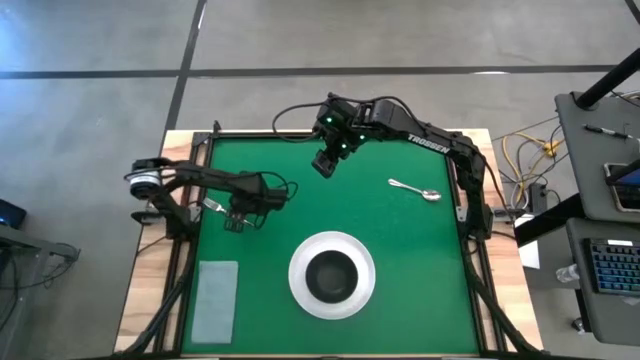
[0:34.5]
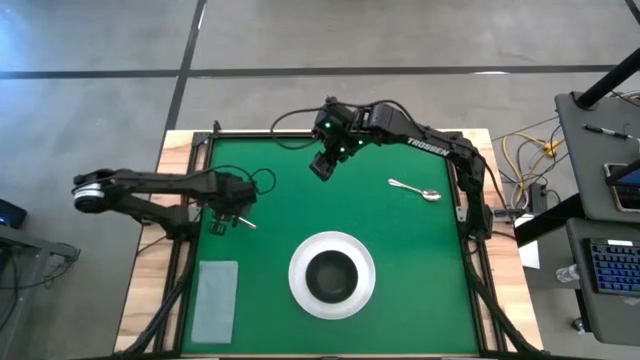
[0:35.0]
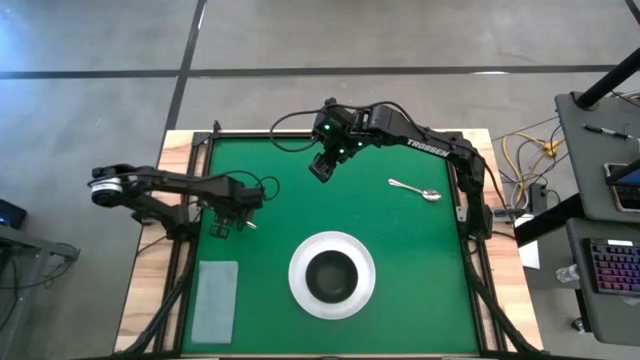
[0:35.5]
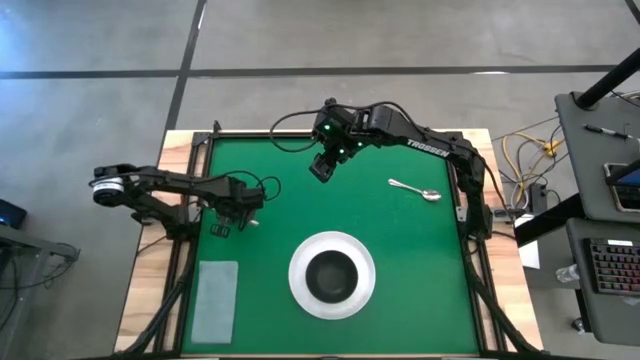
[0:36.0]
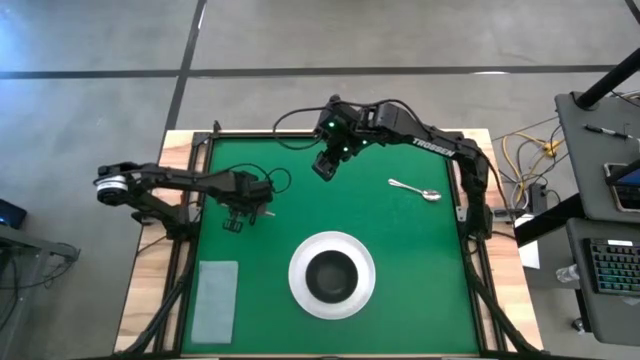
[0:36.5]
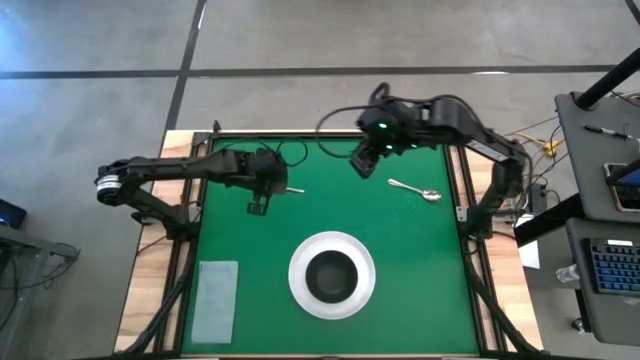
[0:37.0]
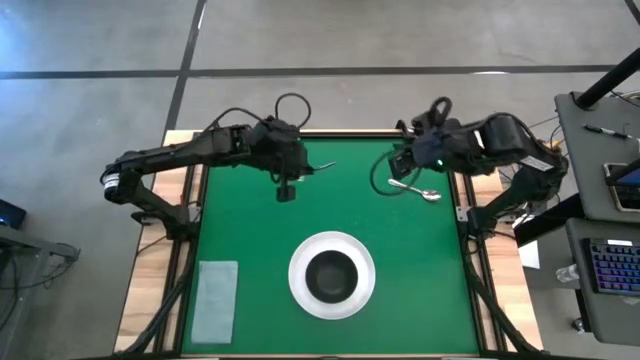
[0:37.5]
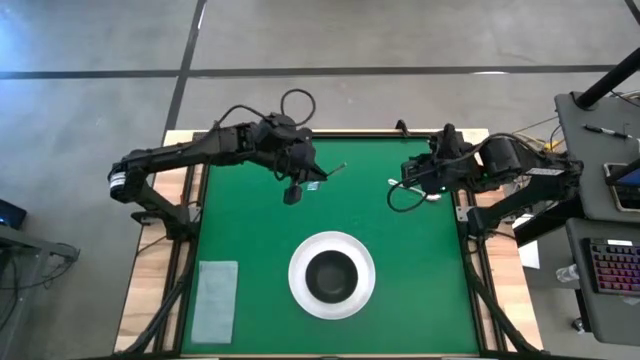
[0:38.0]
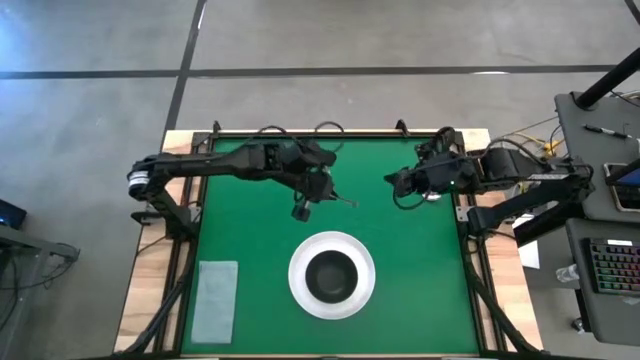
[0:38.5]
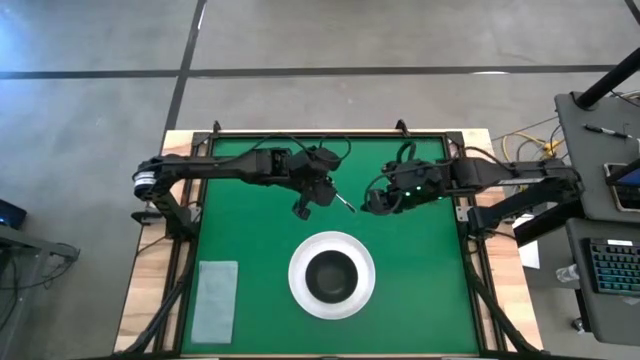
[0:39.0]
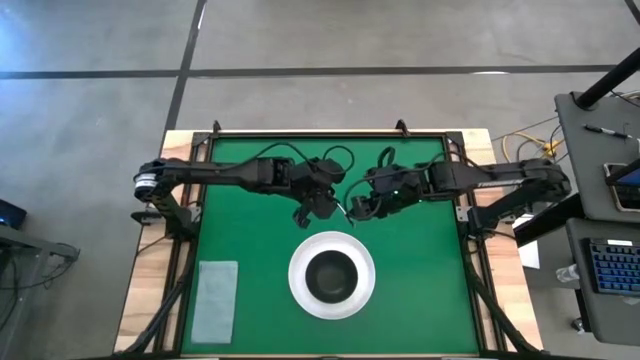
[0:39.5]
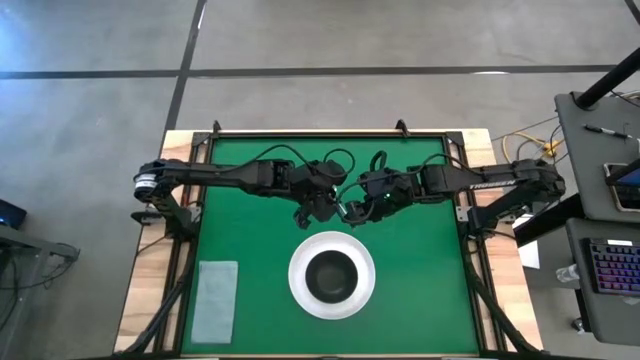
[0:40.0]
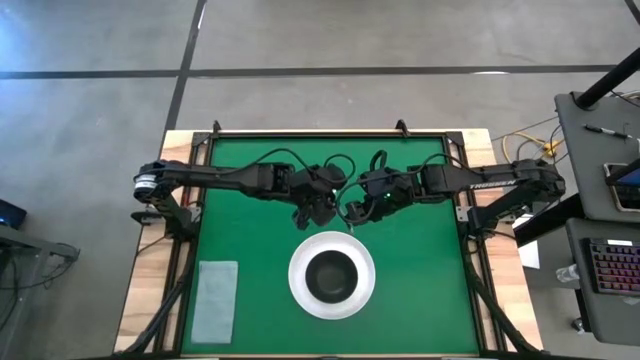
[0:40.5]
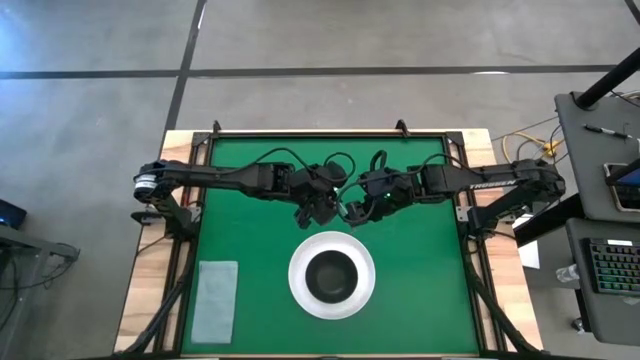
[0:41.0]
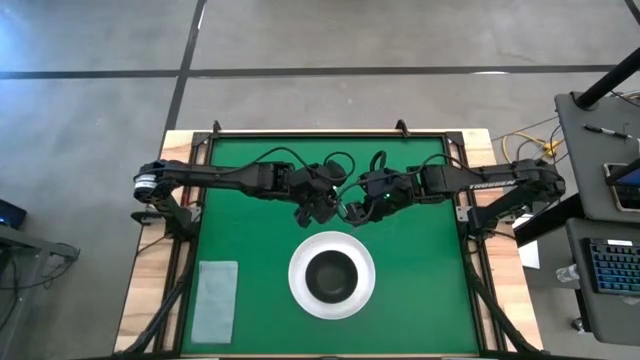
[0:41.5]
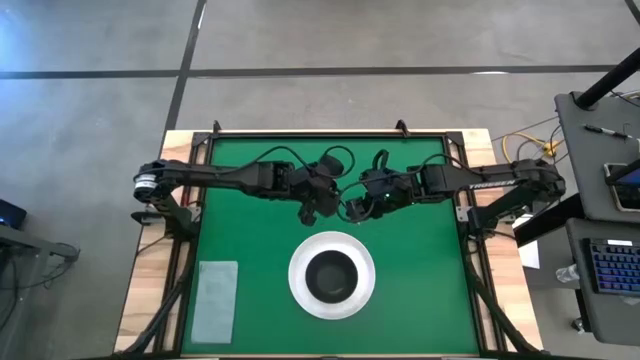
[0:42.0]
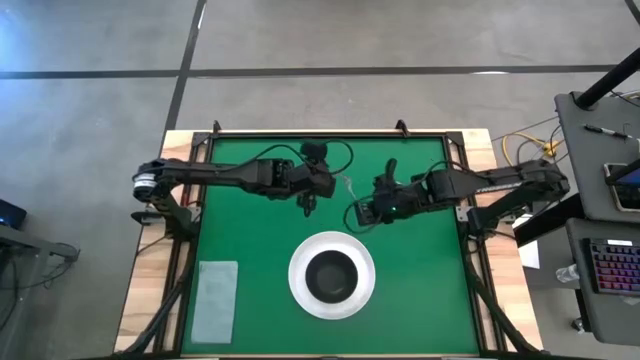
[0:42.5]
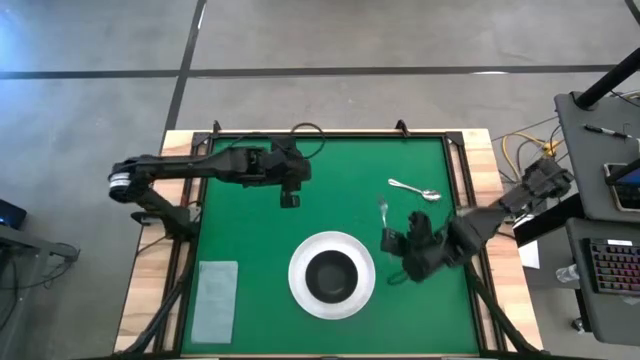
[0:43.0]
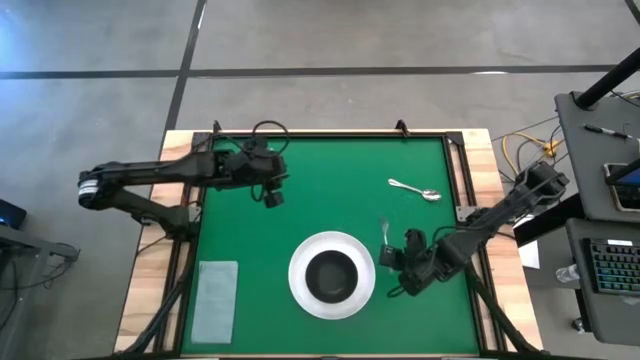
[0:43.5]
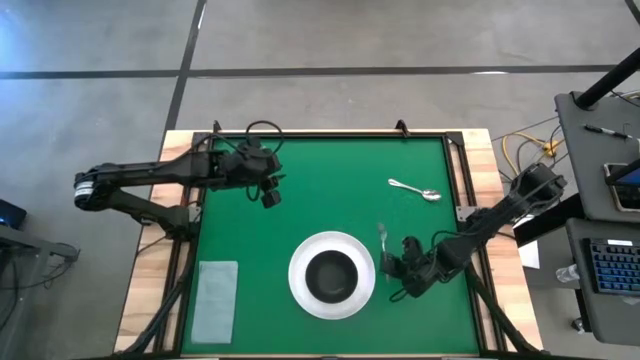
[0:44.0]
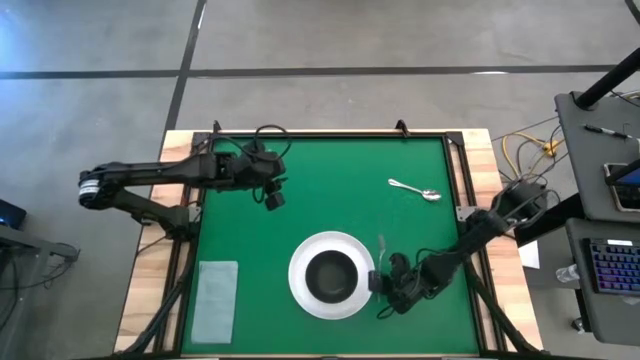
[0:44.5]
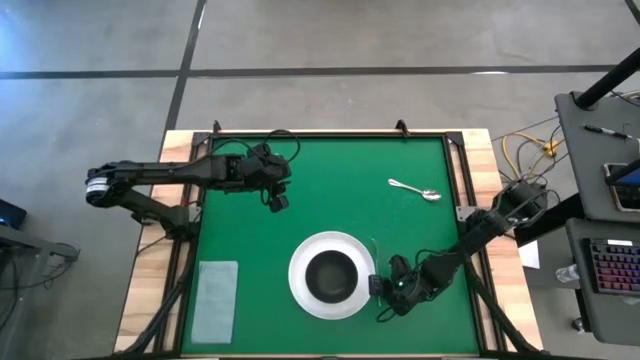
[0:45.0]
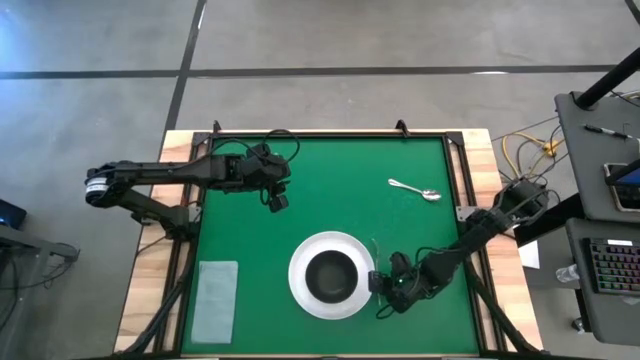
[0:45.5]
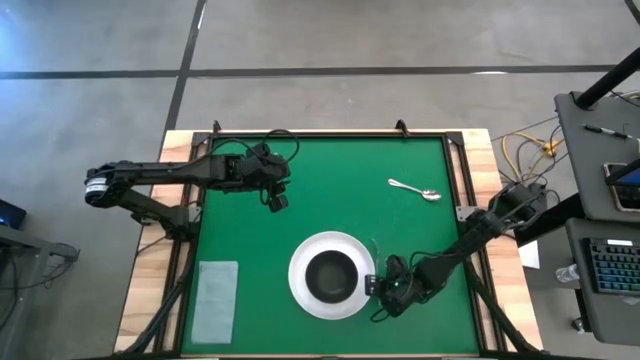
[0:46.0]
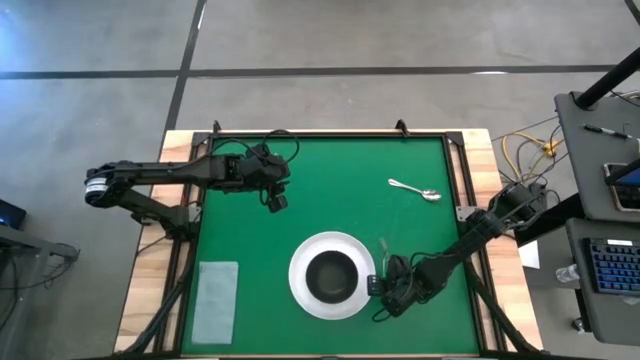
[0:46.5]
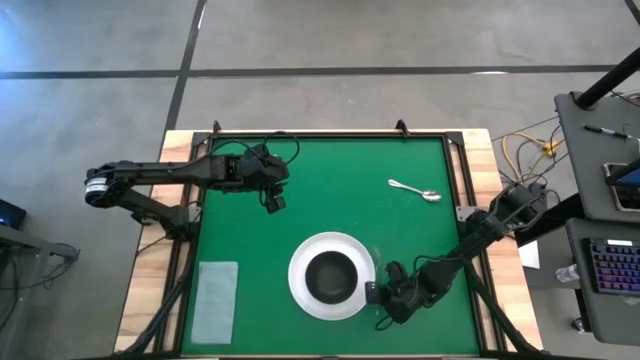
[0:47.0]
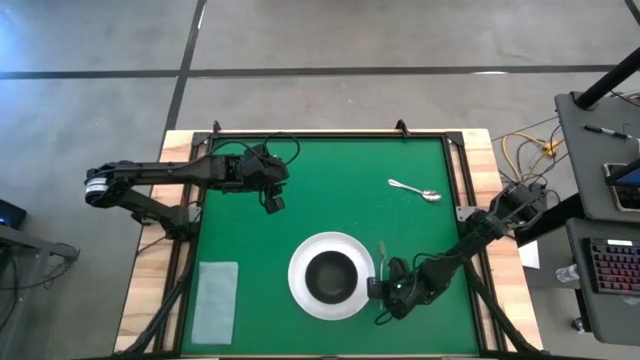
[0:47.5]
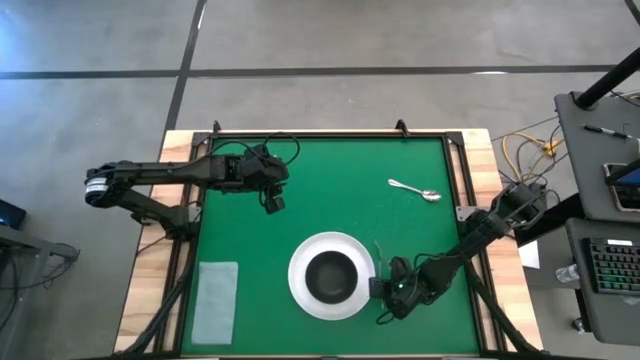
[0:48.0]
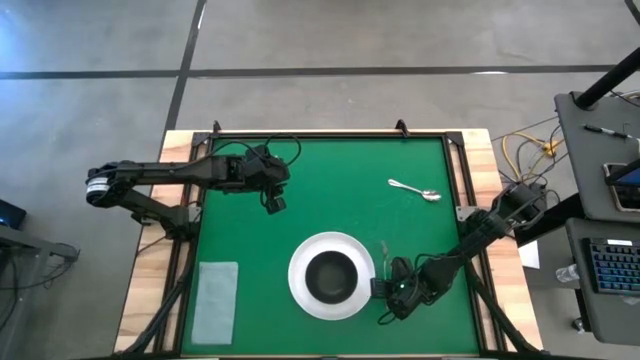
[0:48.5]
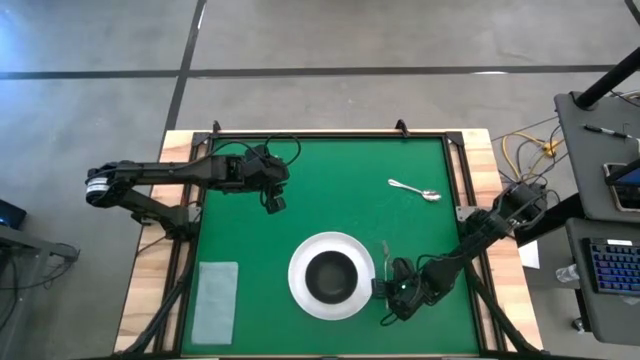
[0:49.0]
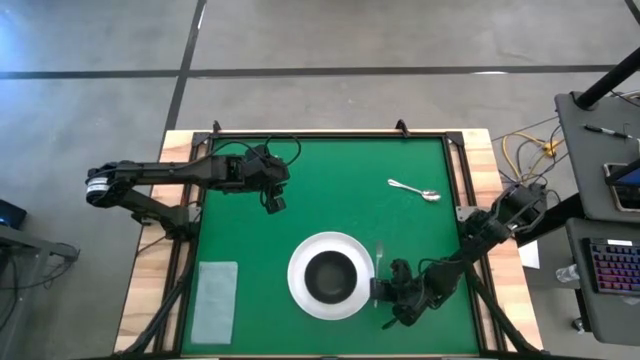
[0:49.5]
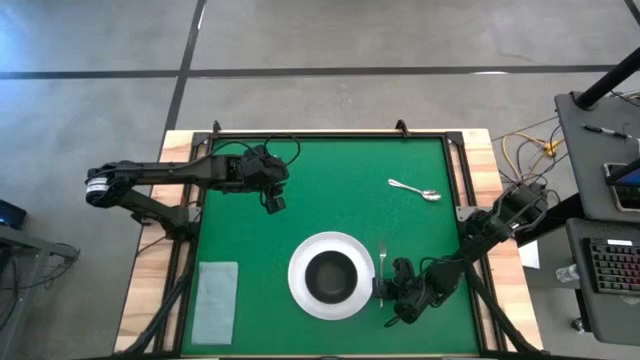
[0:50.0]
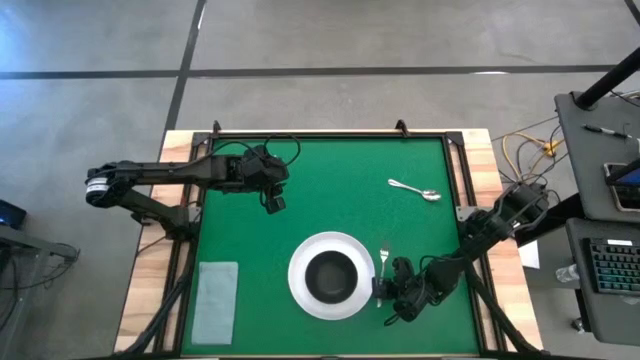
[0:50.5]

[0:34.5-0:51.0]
Task: Set table place
Put the fork beside the white plate on the table

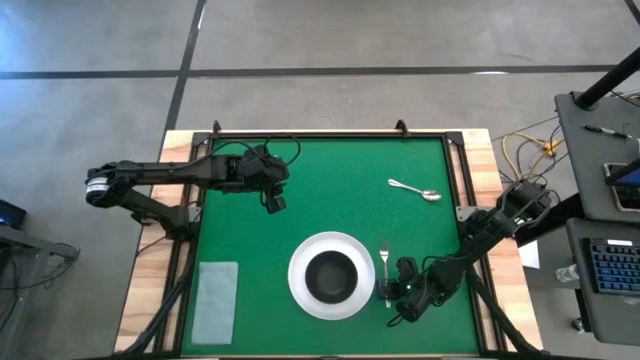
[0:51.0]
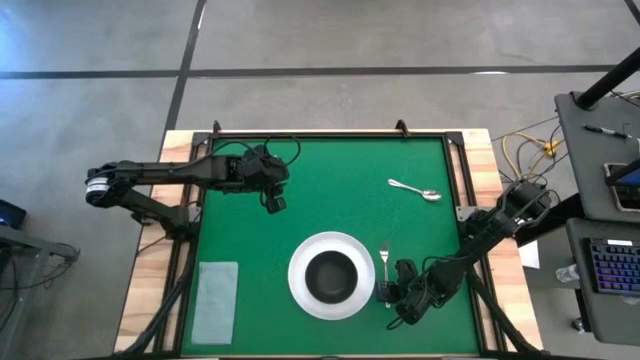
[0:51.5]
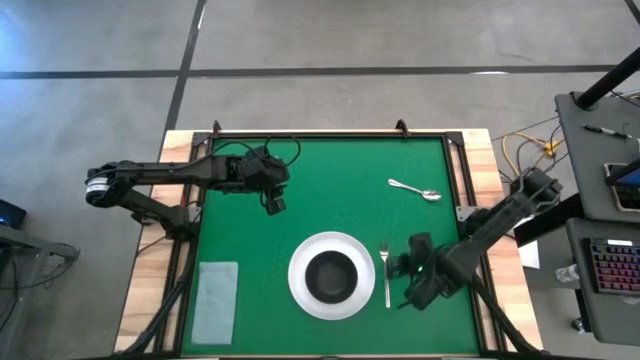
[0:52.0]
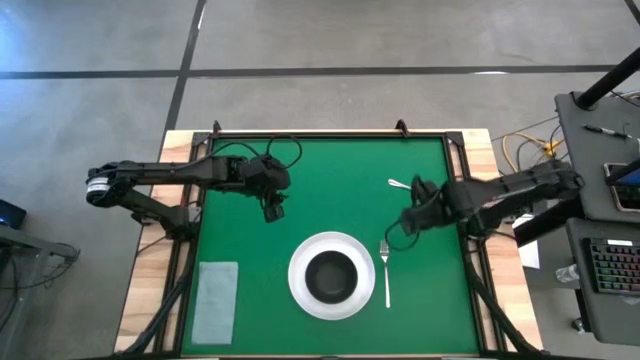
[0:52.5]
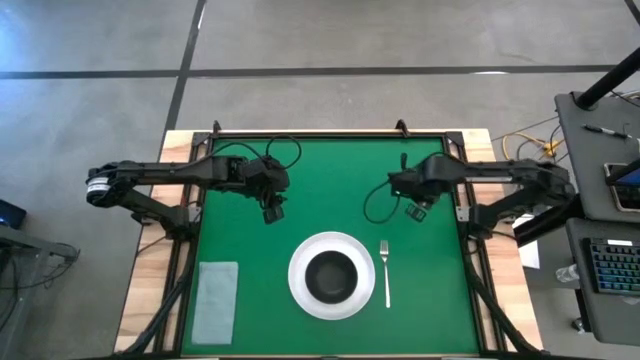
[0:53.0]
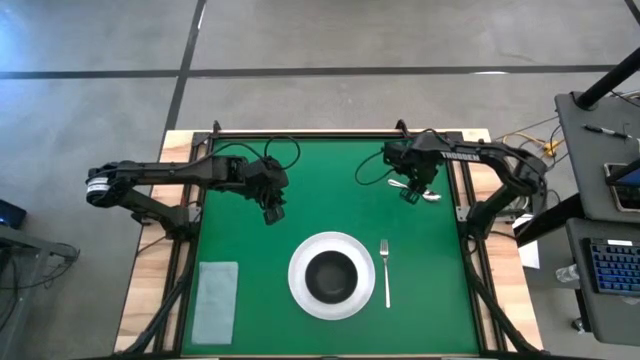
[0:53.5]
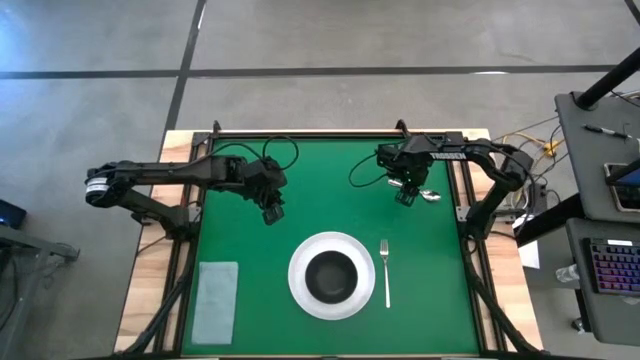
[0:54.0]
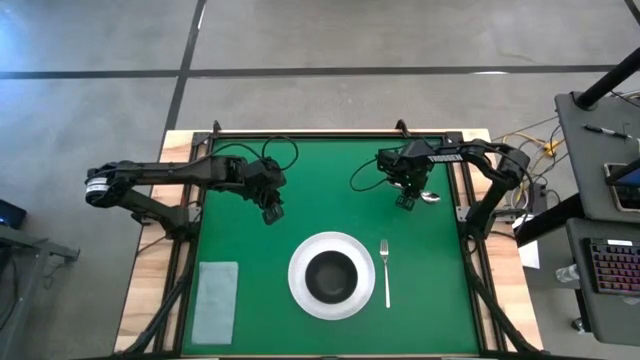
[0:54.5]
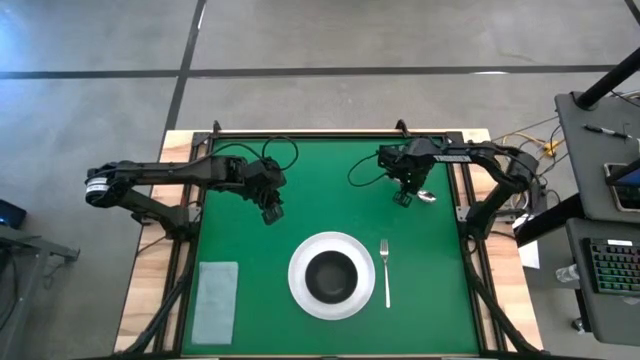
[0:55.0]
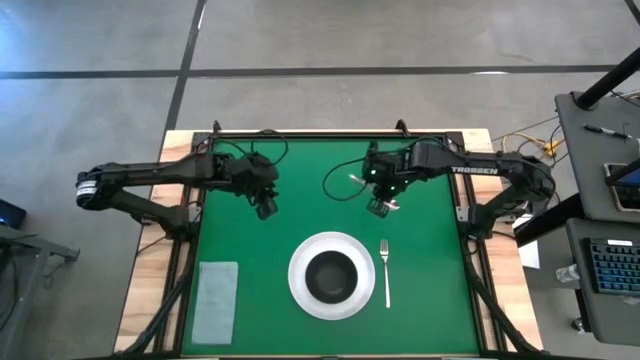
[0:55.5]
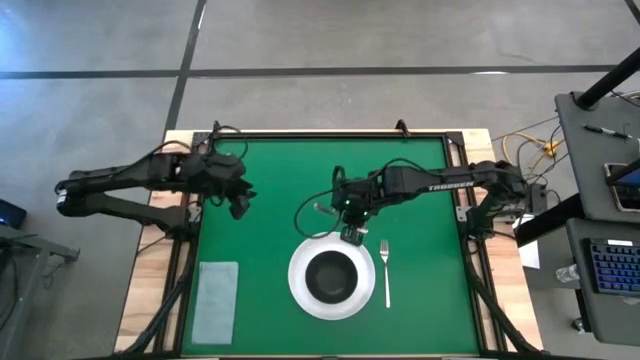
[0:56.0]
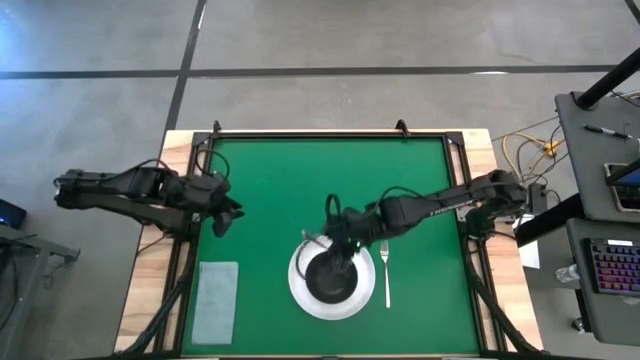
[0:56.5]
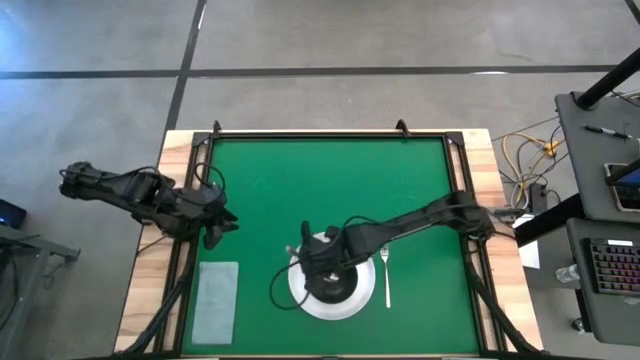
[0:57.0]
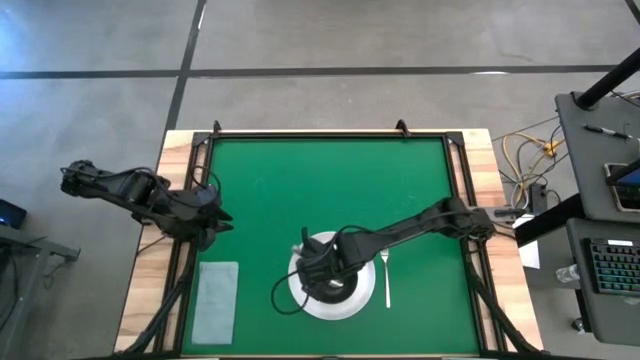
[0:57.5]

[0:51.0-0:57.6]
Put the spoon into the black bowl on the table
